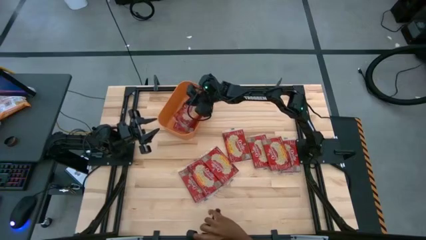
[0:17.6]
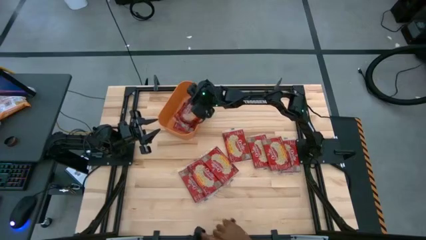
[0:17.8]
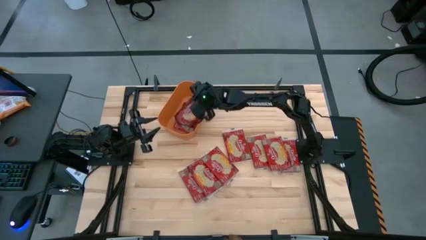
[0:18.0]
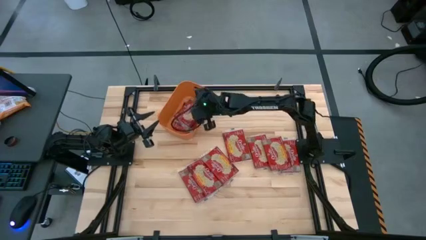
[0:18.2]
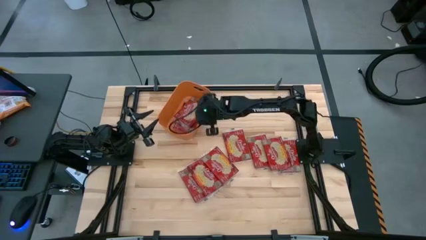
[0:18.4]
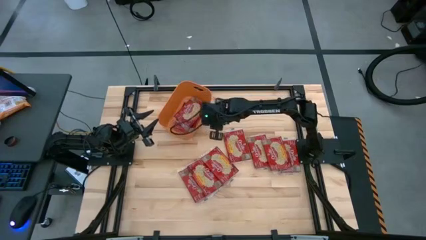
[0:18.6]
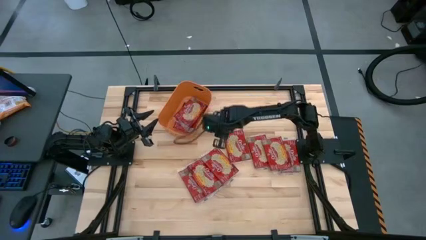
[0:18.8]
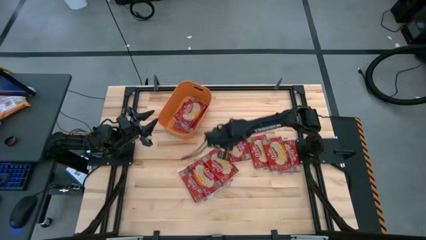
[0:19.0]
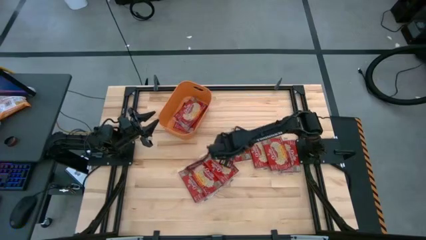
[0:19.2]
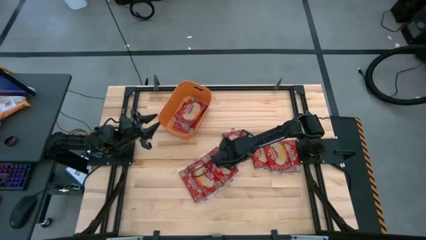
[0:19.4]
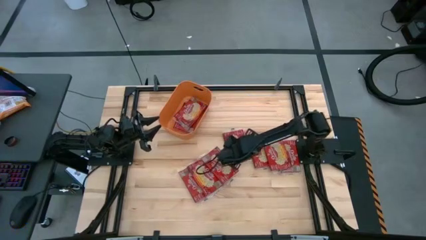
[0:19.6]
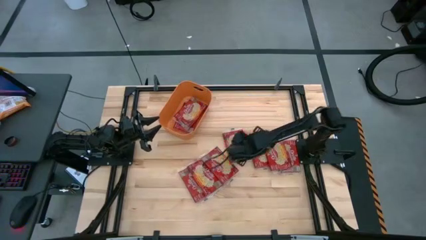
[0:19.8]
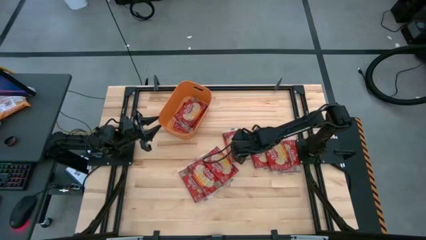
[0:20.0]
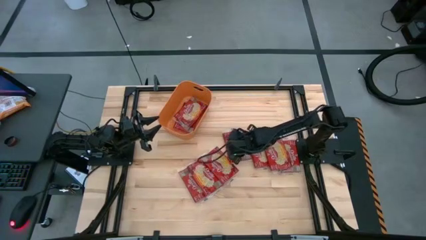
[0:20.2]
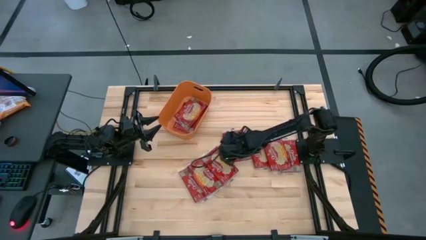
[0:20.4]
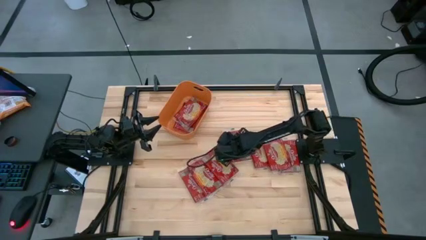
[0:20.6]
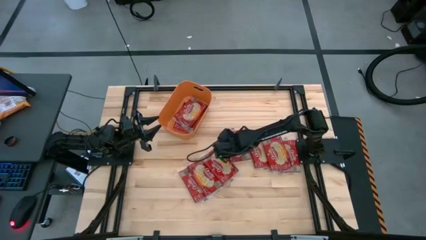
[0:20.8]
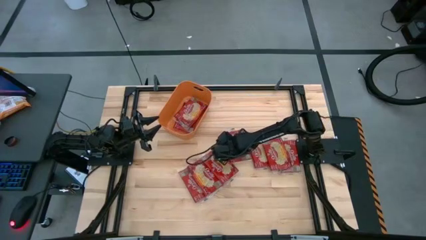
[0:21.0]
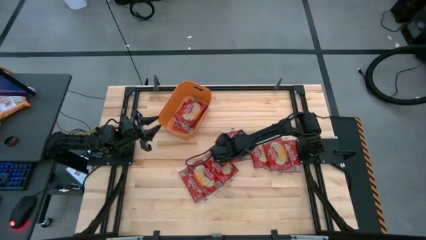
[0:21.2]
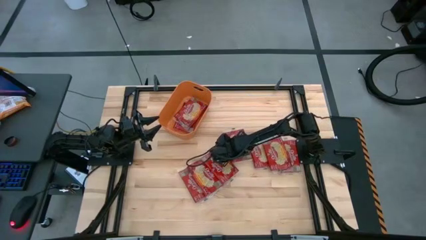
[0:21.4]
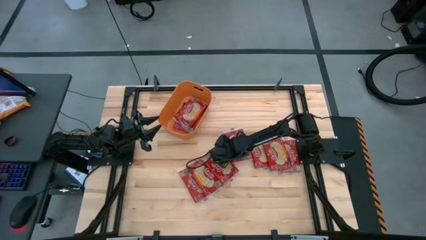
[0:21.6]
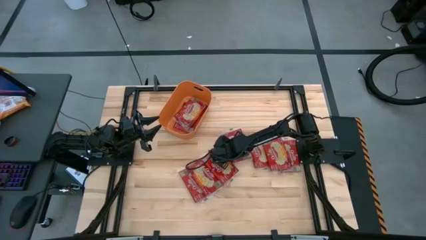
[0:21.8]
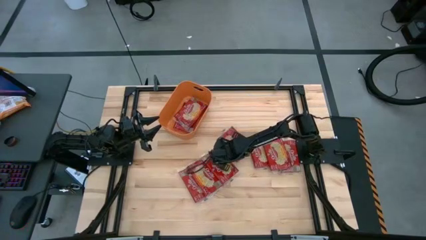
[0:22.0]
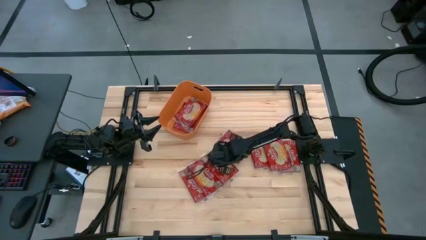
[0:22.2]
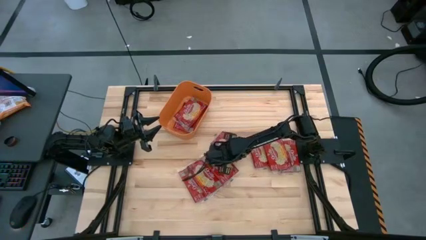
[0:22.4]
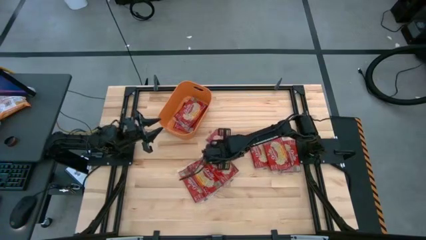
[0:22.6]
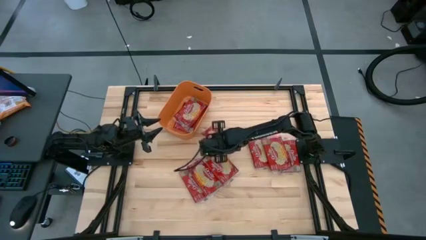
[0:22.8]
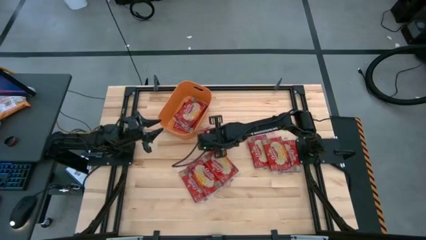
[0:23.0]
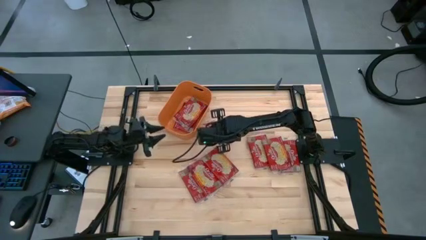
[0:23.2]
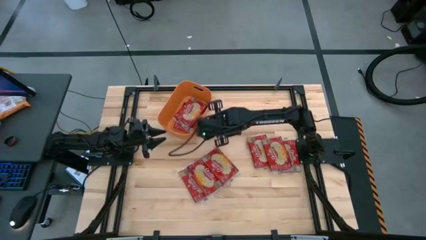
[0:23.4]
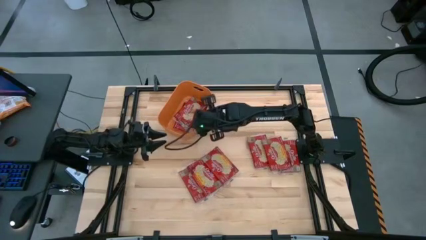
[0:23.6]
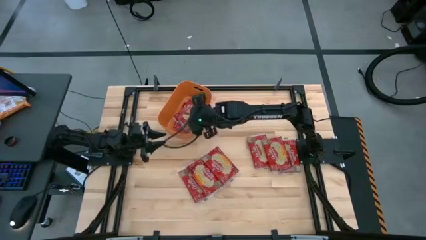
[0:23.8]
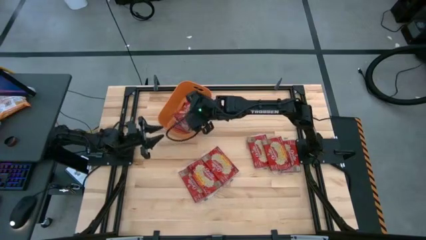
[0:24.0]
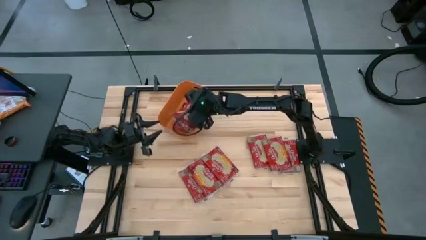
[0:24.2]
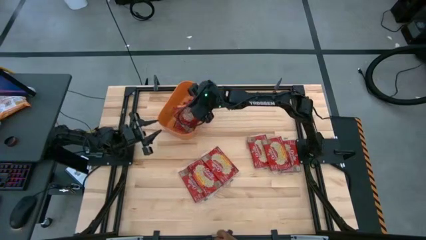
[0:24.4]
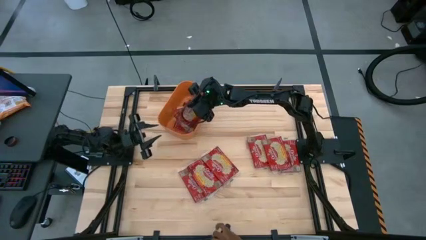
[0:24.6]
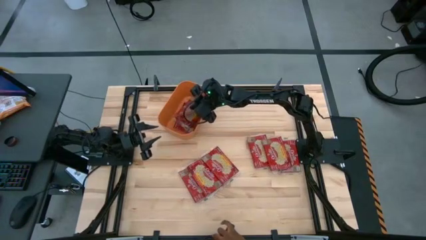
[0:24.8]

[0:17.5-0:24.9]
Task: Sort popcorn bags into baskets
Put the red popcorn bag into the orange bin

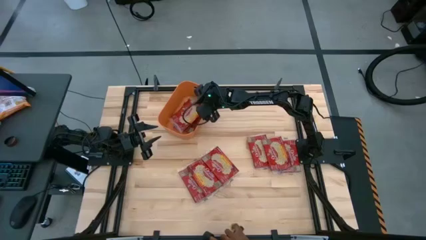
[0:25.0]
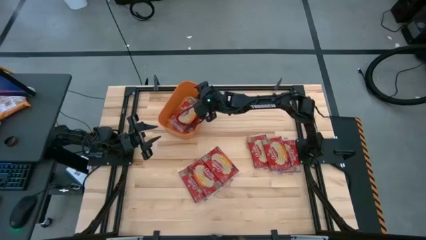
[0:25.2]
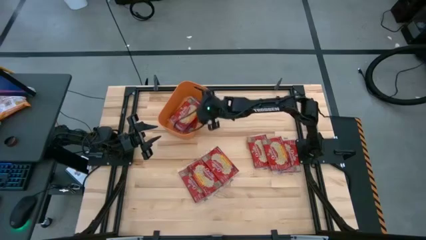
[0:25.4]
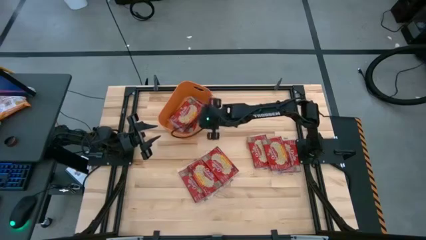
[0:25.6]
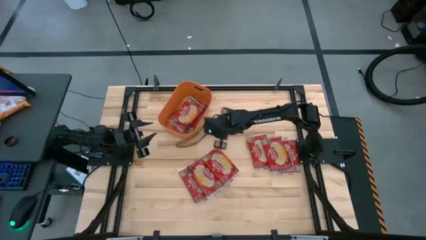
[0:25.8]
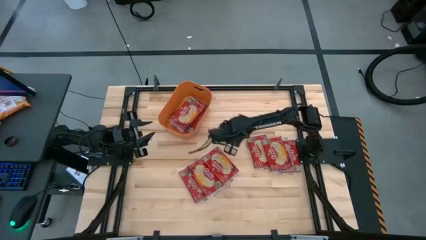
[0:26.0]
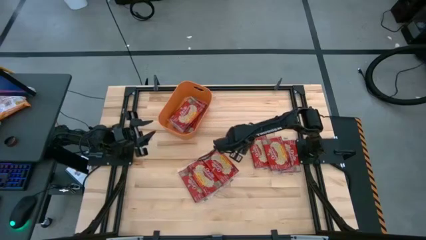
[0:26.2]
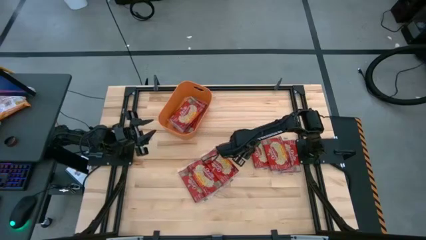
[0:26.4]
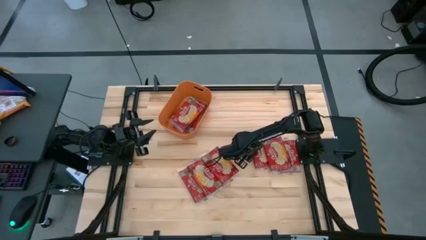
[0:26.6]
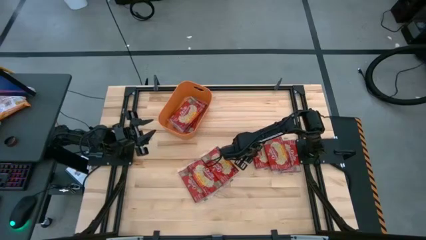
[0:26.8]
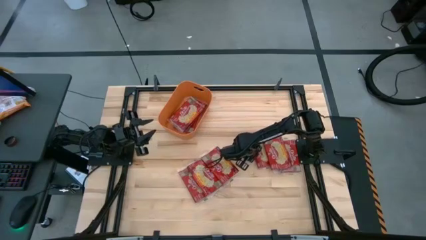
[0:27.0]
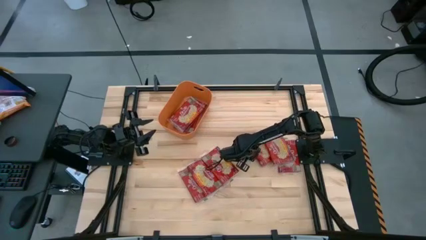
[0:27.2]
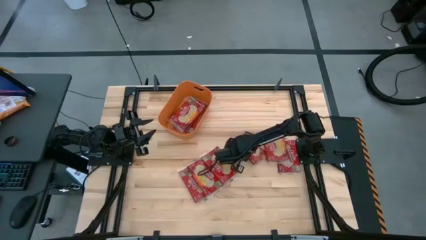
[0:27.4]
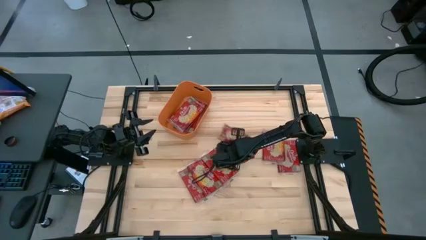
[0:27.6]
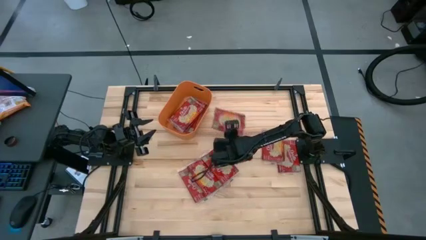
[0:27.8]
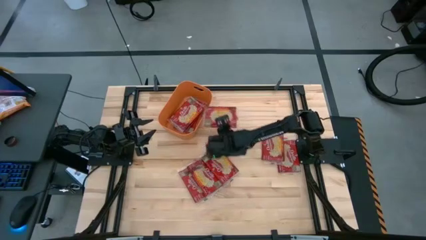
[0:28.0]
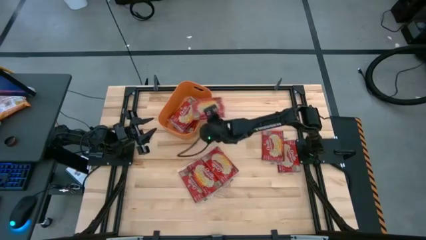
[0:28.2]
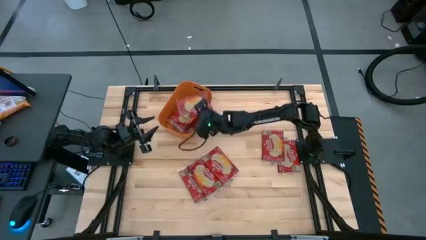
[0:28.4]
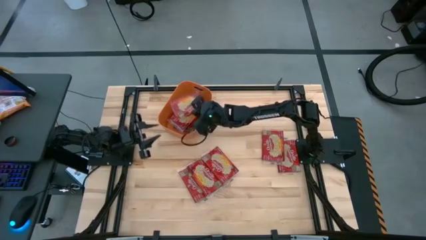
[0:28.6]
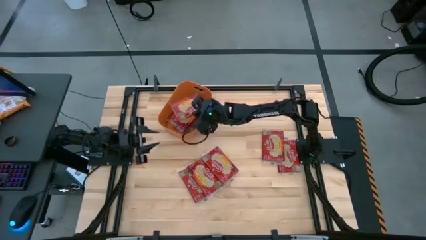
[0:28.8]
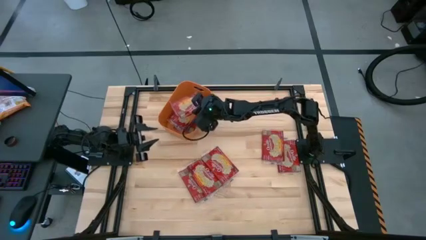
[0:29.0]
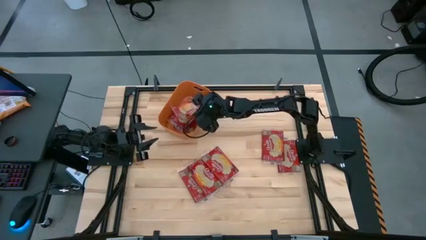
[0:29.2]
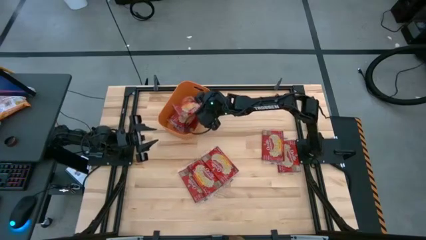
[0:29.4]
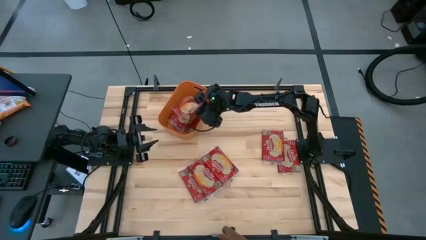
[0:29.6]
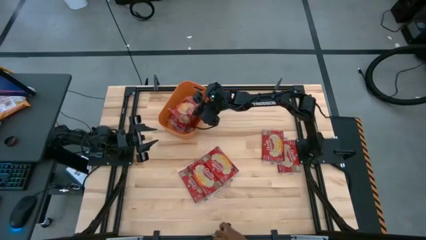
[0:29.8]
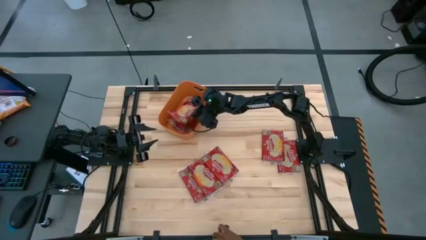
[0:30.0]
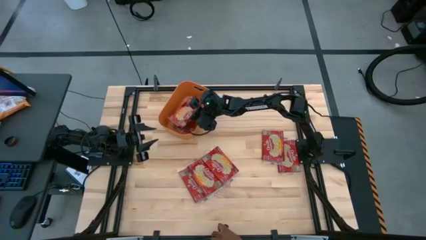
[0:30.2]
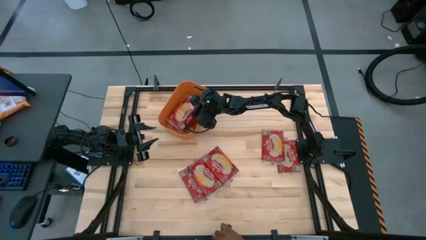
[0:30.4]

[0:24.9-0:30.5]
Put the red popcorn bag into the orange bin

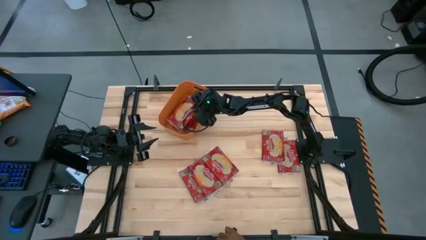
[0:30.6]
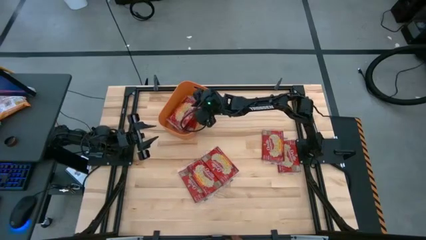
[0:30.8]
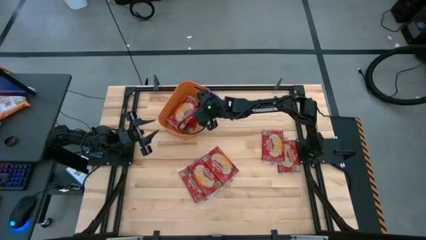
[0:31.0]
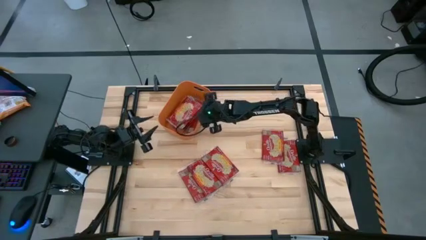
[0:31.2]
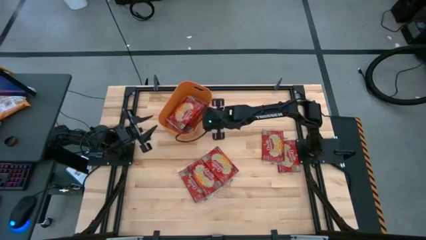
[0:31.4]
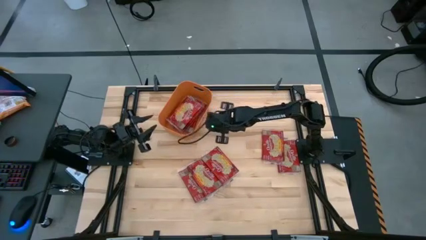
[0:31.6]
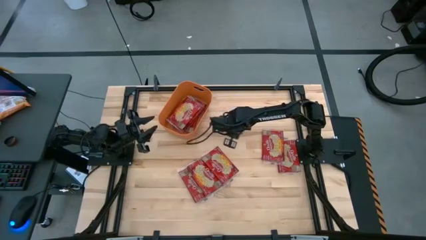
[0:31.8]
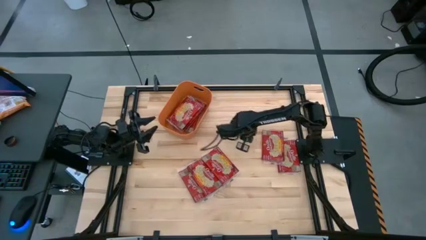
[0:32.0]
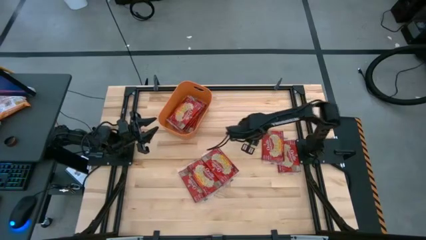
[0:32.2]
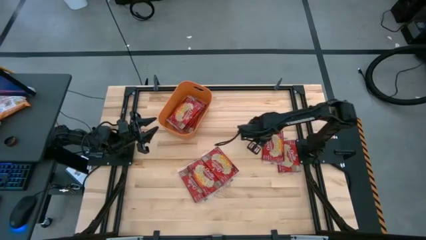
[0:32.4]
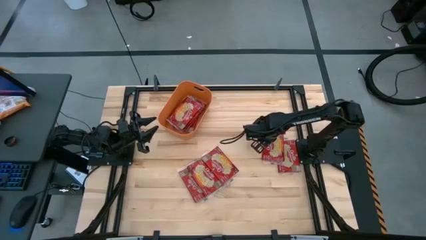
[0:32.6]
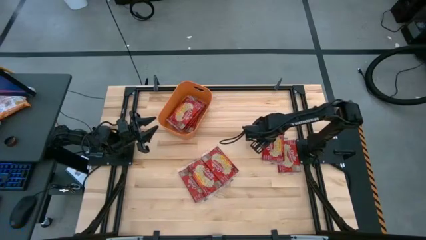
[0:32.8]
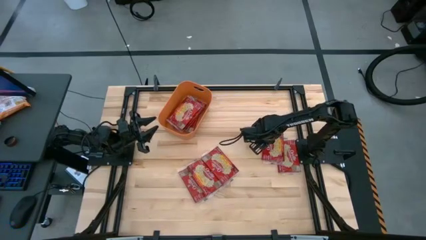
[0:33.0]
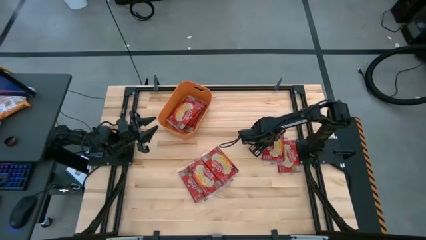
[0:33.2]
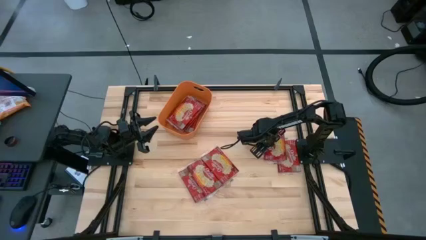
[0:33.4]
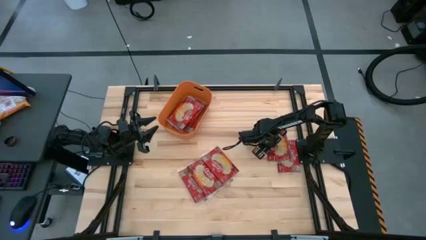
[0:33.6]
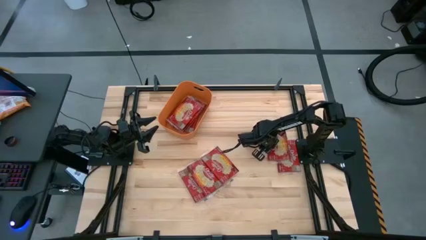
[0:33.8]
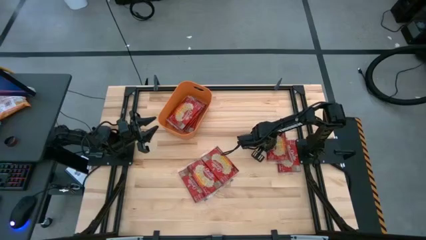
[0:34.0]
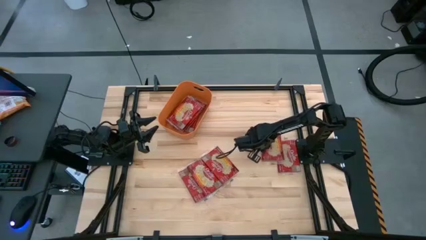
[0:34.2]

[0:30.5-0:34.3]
Put the red popcorn bag into the orange bin
